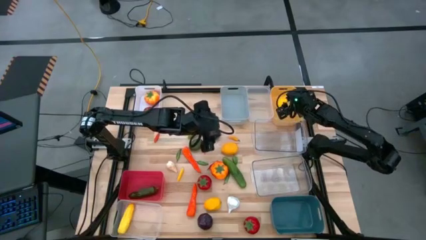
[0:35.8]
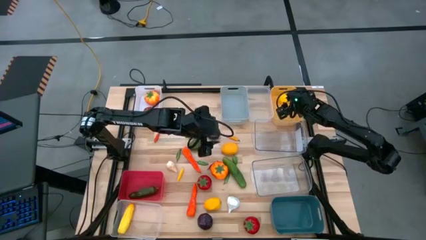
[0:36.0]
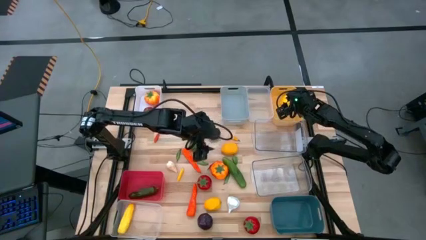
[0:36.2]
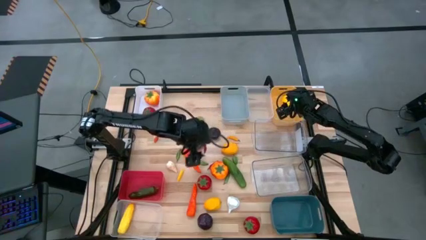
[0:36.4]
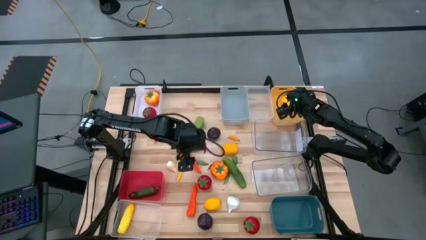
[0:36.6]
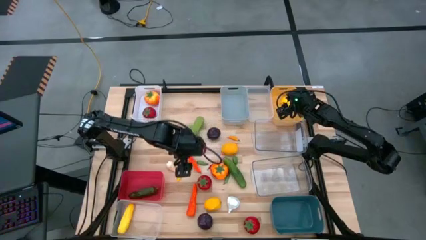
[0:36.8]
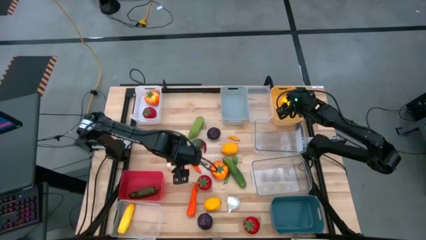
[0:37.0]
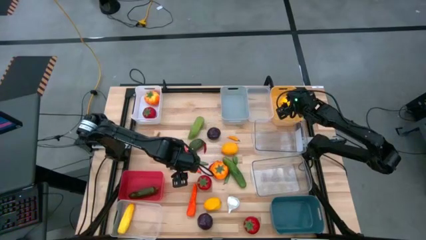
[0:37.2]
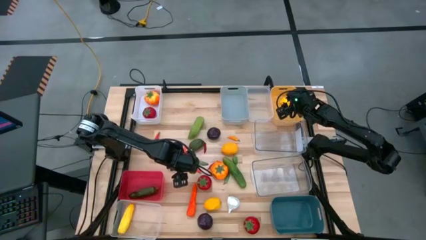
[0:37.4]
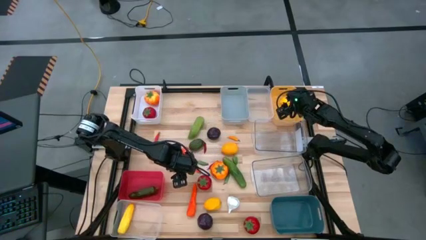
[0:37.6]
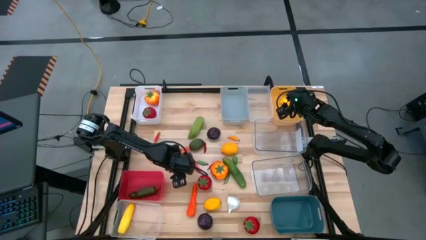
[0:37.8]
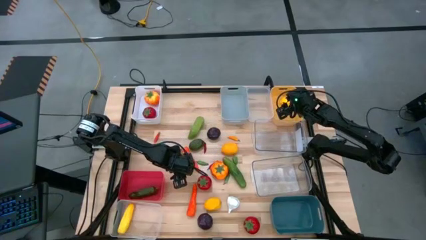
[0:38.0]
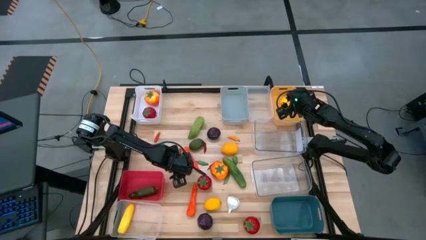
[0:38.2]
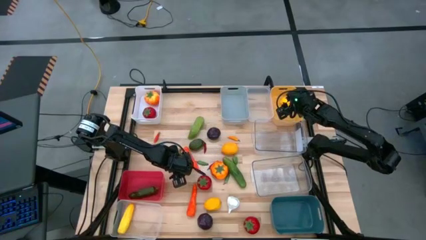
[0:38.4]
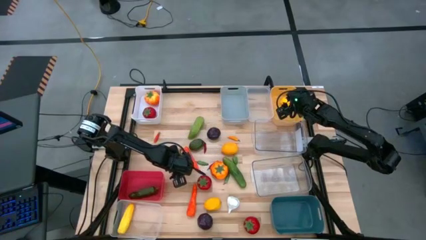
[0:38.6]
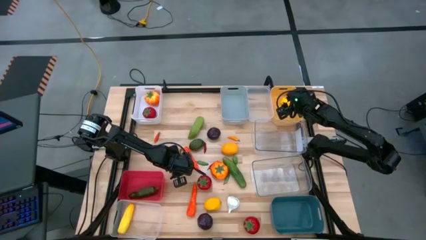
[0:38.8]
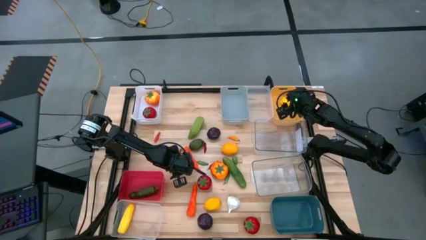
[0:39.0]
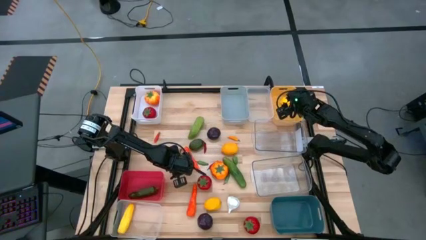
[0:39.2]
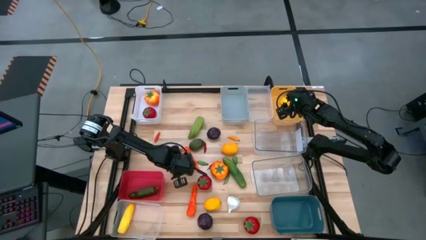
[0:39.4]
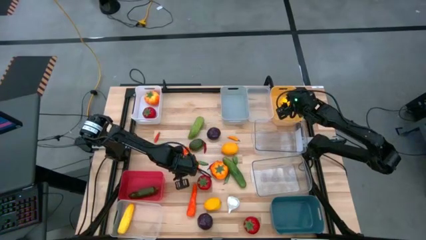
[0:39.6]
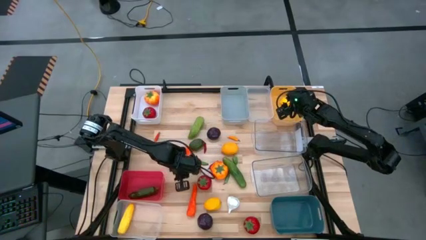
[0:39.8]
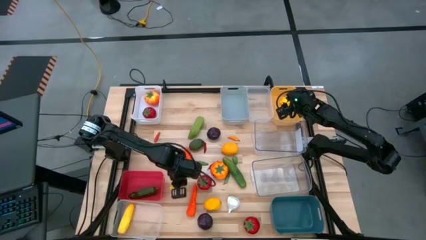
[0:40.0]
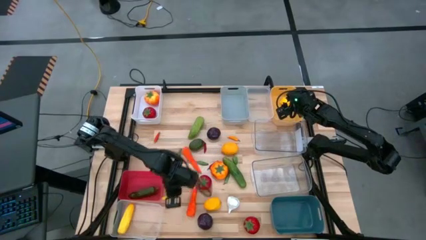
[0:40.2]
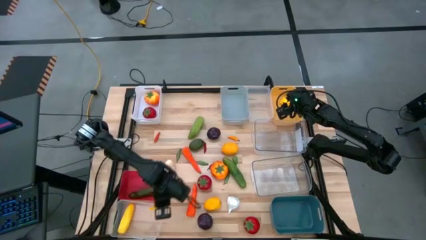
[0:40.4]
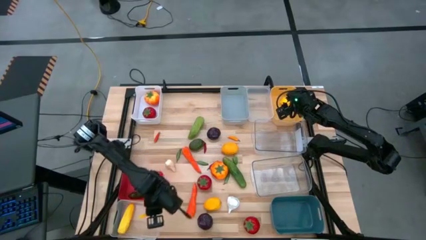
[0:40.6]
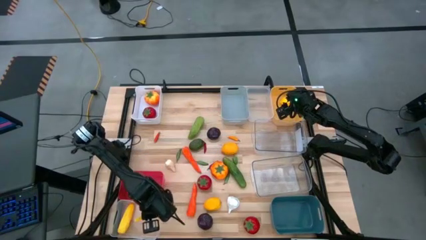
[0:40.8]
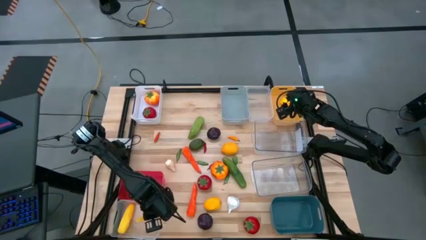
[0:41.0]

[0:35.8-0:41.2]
Task: Sort produce into baskets
Put the small corn into the bottom white transparent bin

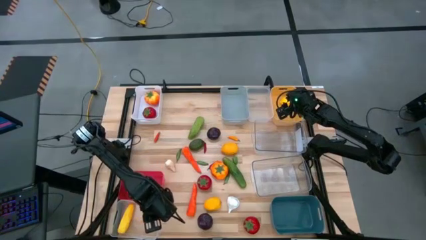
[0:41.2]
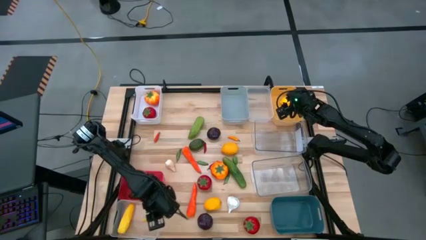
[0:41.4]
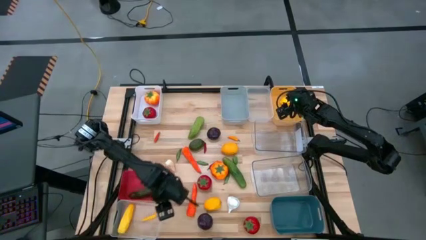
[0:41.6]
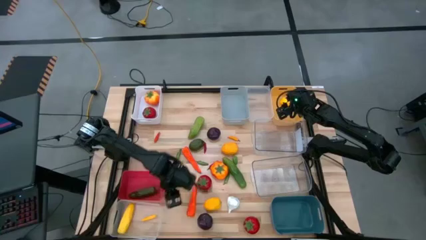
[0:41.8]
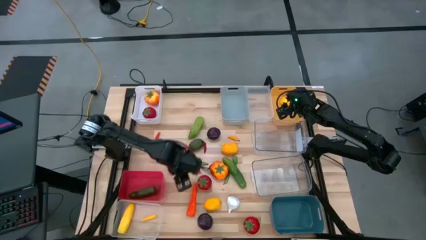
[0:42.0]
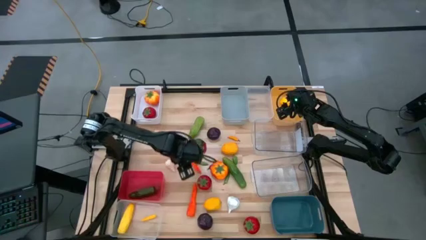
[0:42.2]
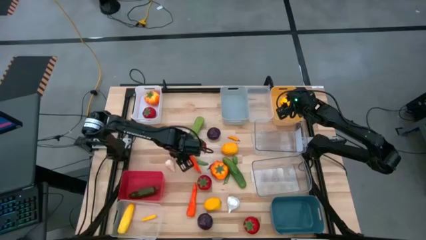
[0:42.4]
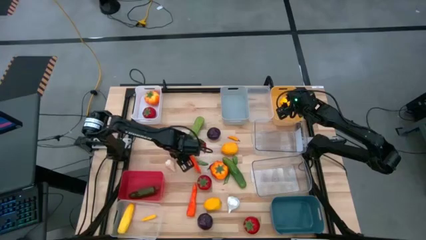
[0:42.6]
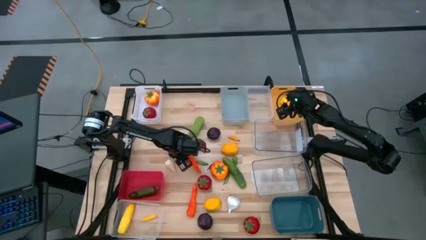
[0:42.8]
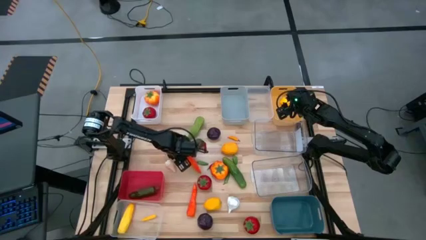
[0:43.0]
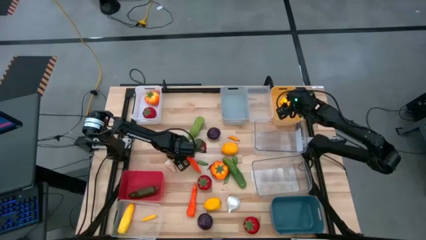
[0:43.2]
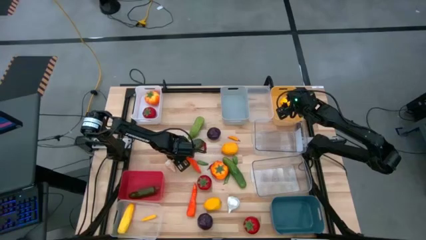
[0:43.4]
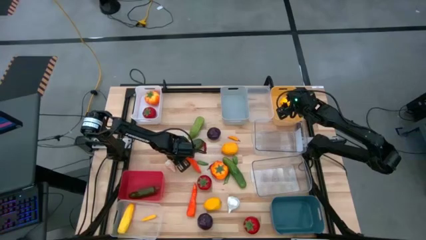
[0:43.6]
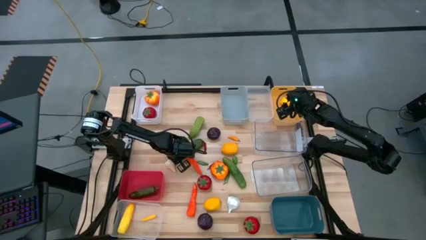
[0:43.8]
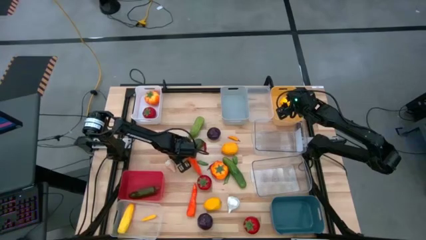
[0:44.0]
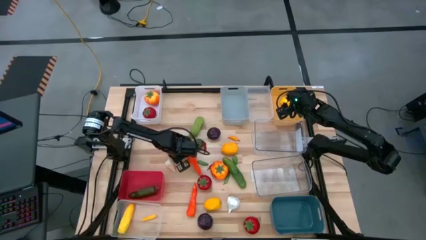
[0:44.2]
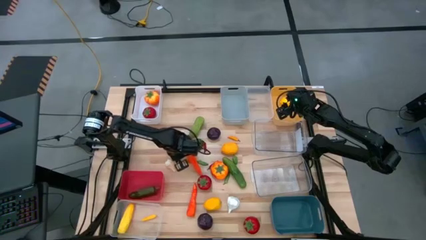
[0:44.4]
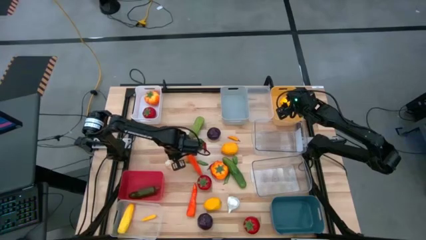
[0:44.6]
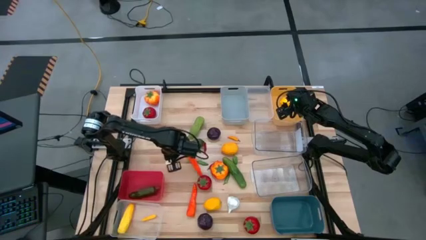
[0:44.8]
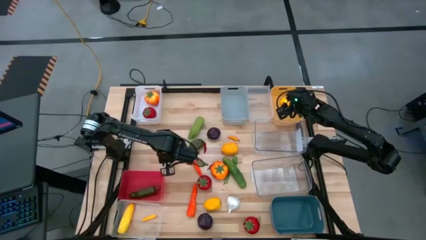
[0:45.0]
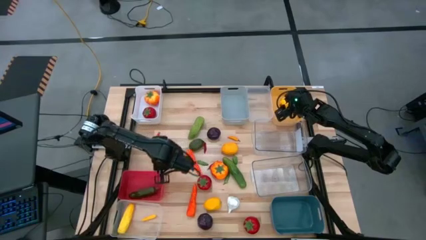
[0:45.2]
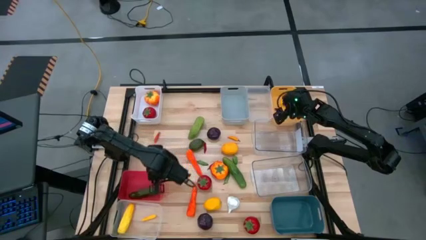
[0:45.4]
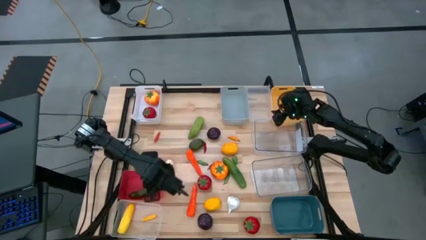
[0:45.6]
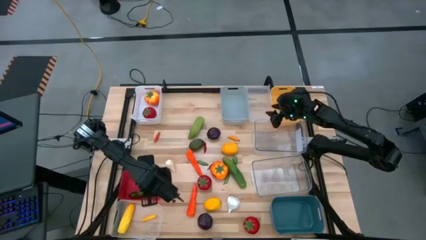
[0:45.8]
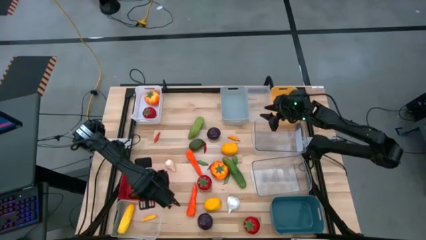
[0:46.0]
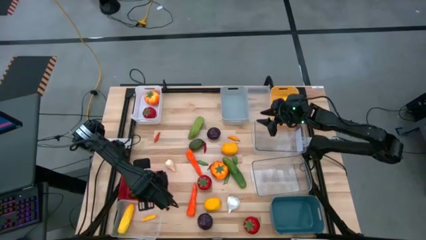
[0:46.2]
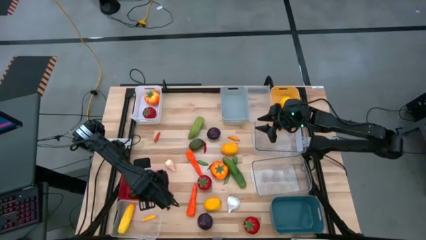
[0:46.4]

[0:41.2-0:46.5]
Put the top left green chili pepper into the red bin

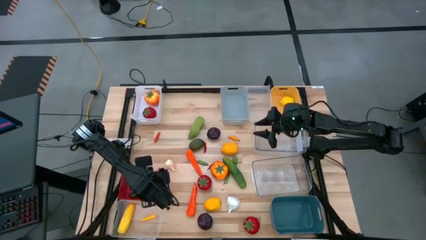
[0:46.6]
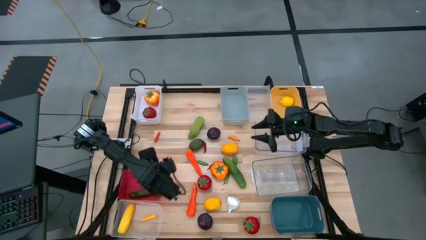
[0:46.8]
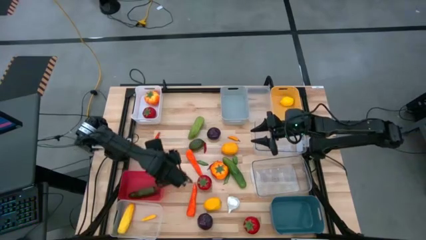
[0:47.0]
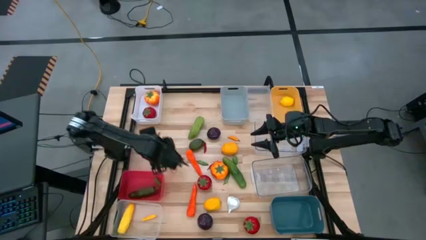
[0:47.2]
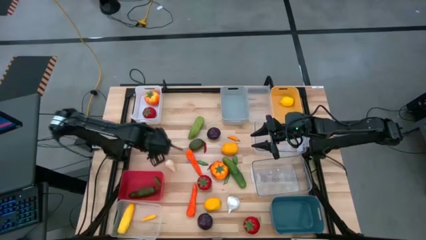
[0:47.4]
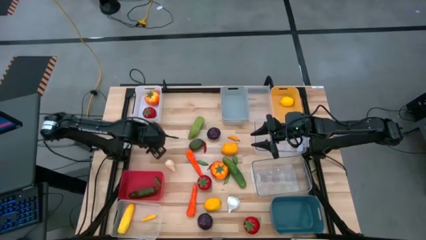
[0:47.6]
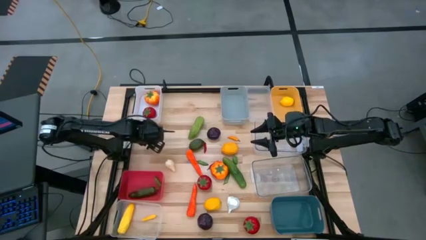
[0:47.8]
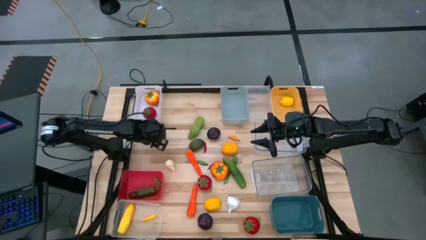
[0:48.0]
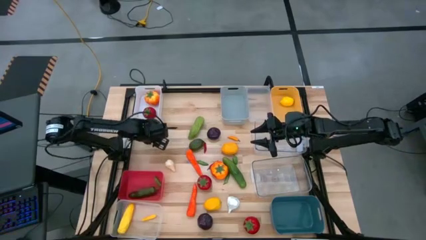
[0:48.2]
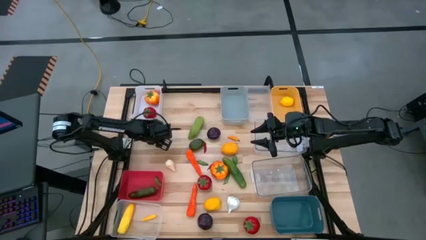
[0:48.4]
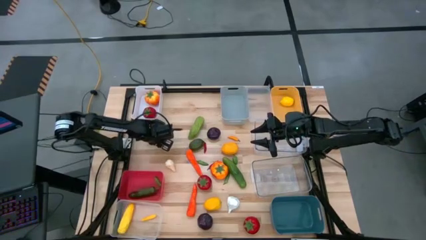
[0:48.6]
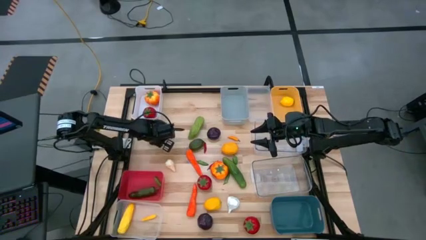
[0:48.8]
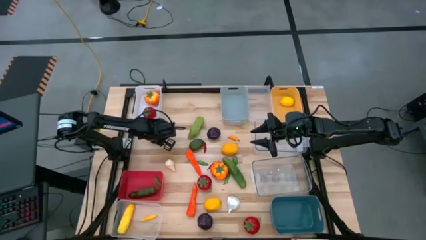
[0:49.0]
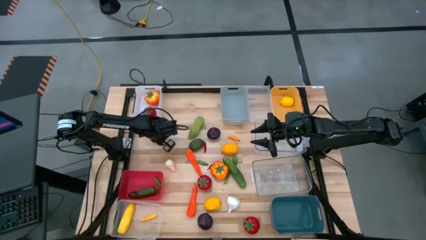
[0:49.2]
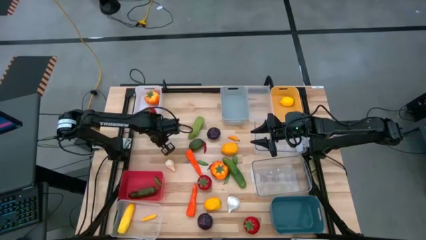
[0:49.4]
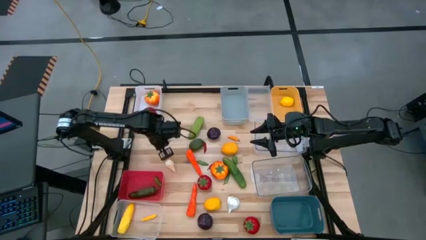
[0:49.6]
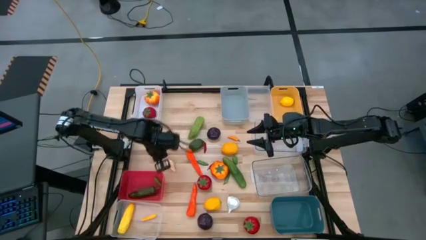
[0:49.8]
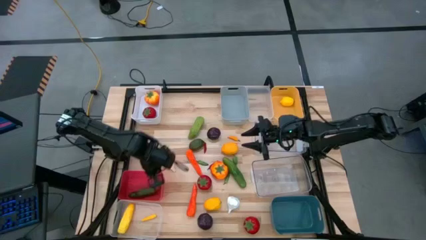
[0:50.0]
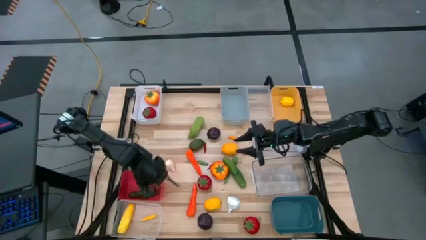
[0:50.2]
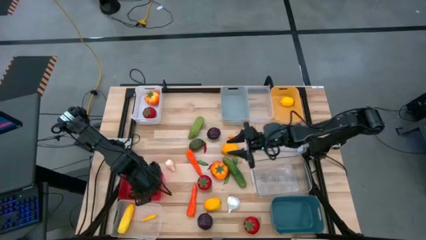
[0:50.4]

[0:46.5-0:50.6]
Put the left red chili pepper into the red bin

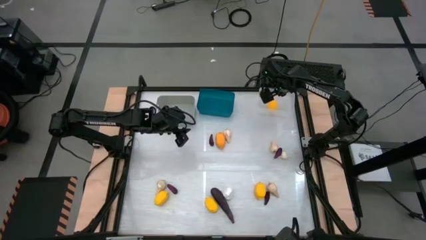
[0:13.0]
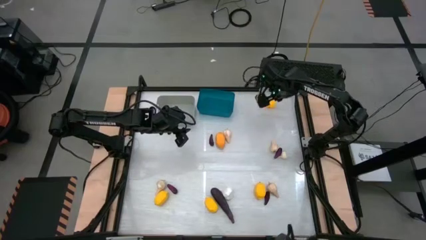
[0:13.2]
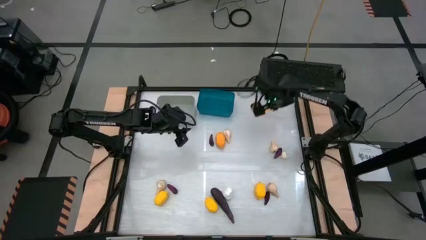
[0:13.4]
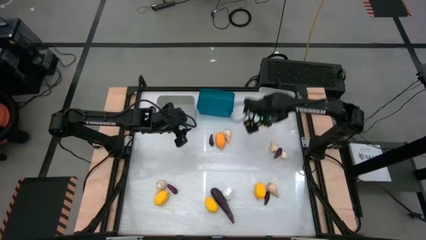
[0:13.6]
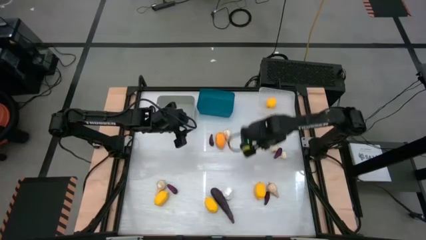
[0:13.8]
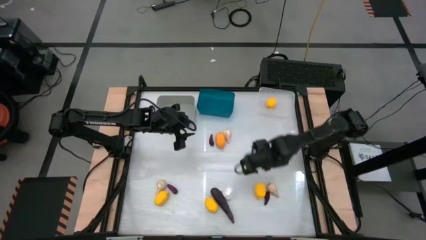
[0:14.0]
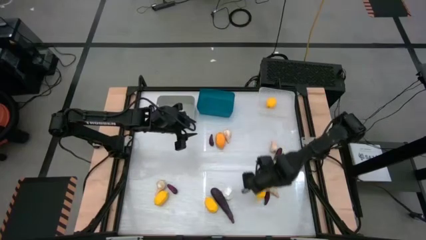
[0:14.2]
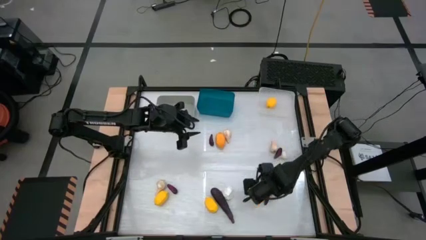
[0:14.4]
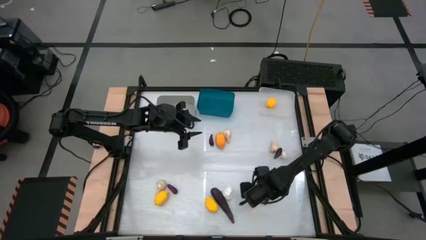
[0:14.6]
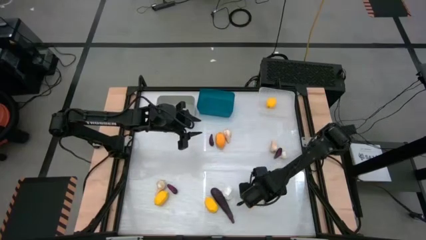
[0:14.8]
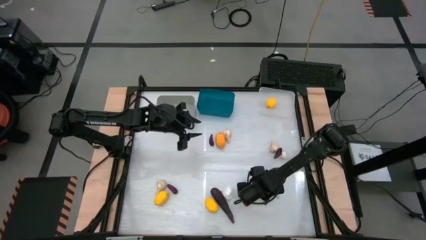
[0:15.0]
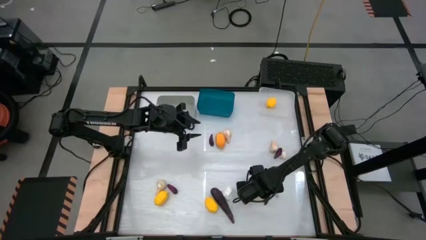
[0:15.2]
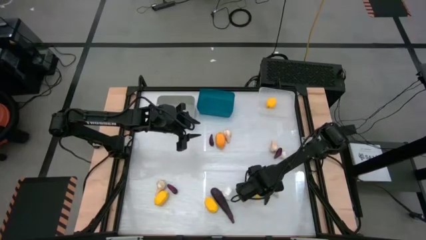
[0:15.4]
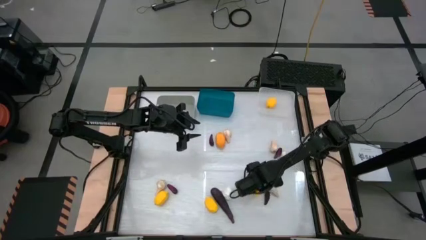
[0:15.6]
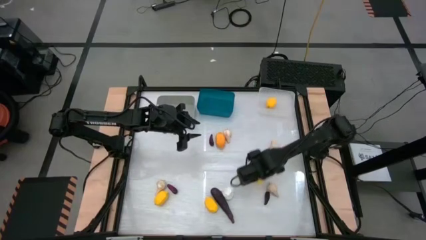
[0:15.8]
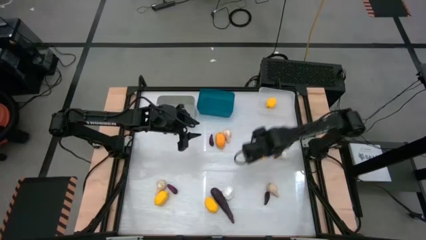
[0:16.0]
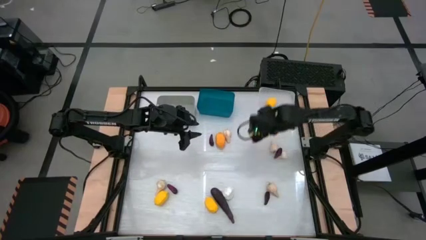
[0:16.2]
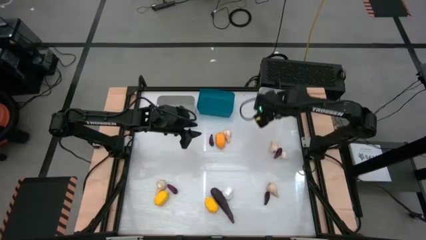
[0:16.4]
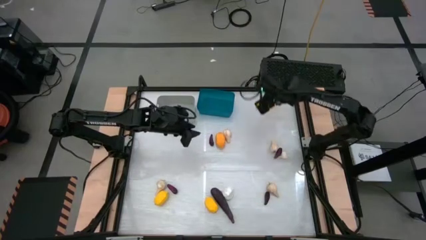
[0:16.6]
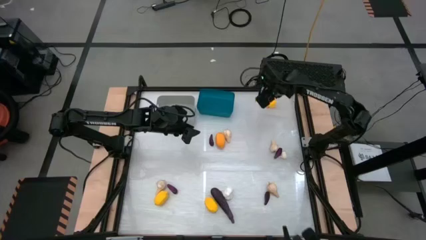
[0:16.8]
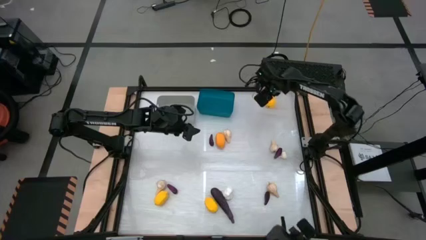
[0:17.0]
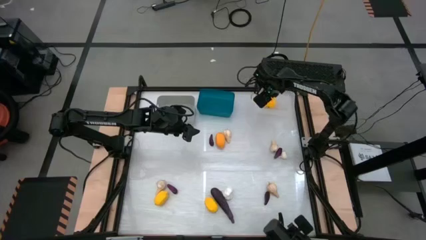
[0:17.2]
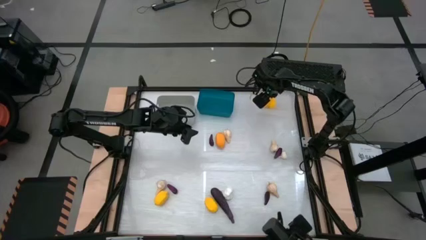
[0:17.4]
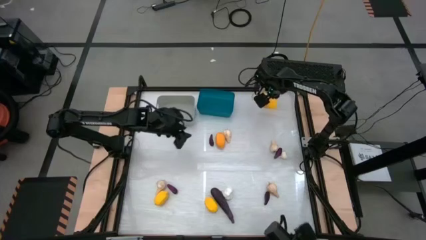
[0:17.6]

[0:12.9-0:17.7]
Task: Sort produce into baskets
Put the lemon into the transparent bin
